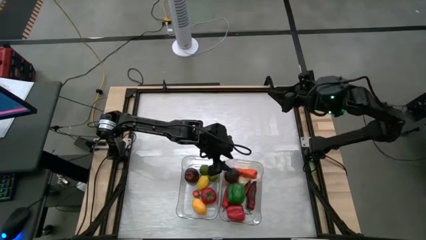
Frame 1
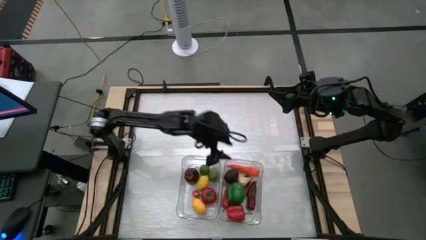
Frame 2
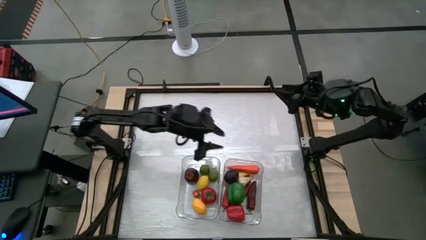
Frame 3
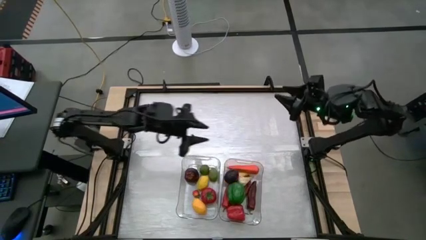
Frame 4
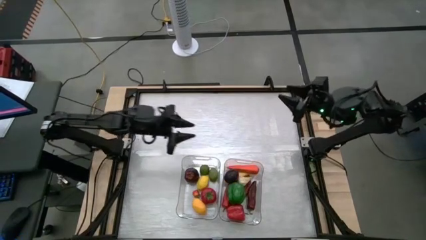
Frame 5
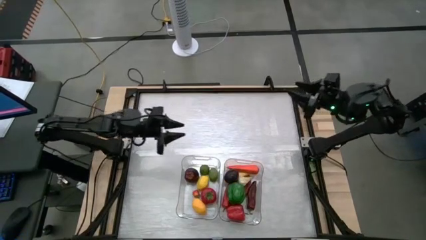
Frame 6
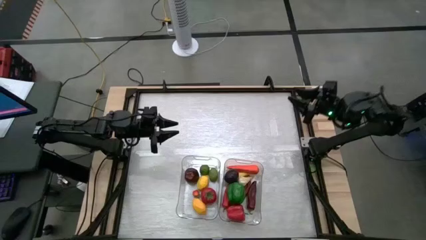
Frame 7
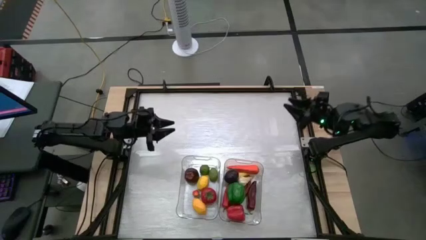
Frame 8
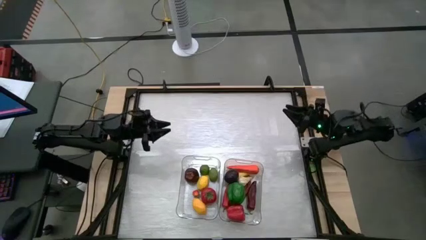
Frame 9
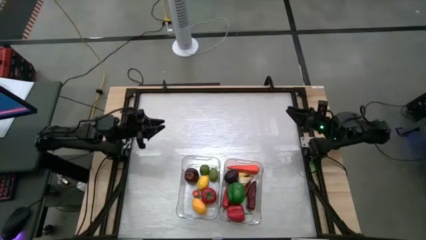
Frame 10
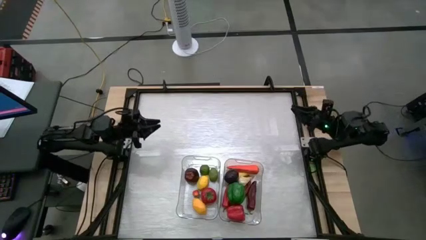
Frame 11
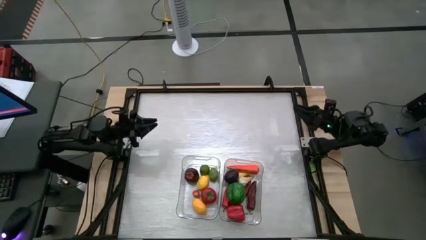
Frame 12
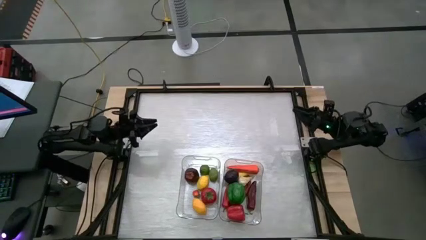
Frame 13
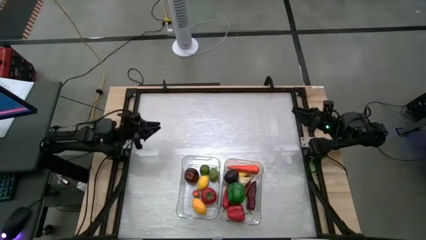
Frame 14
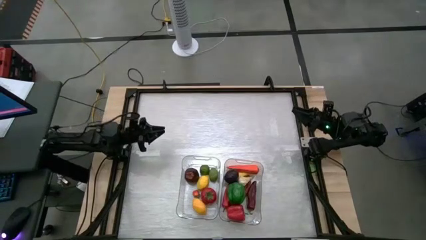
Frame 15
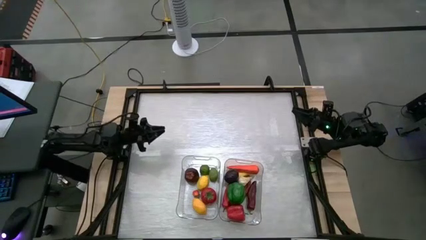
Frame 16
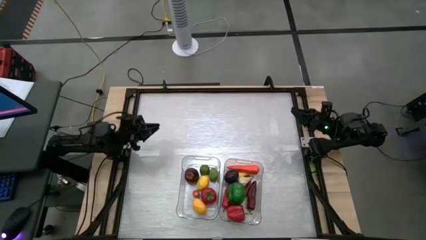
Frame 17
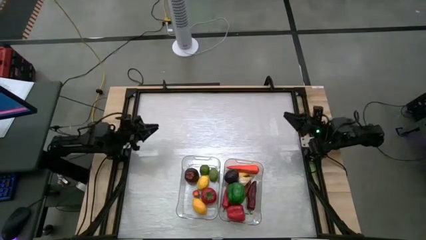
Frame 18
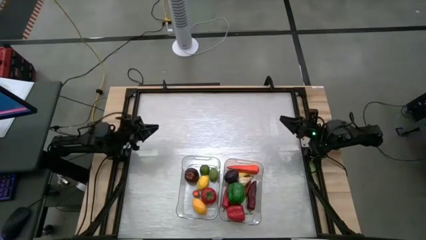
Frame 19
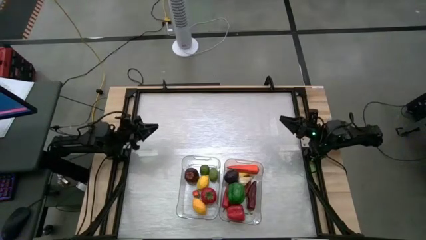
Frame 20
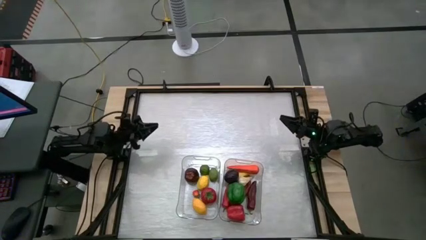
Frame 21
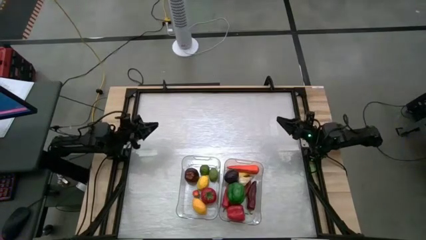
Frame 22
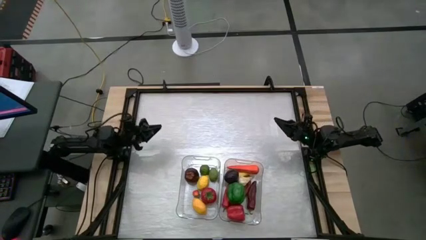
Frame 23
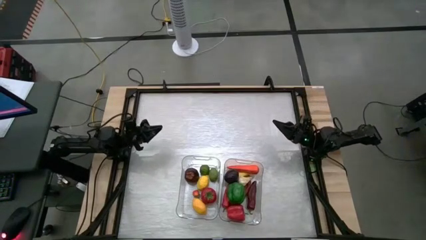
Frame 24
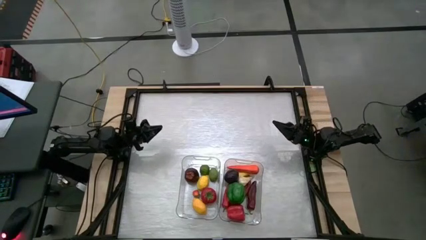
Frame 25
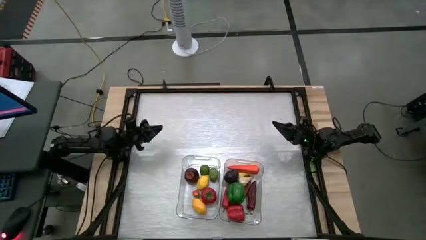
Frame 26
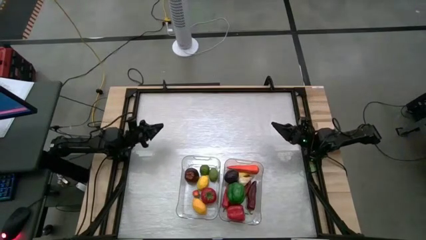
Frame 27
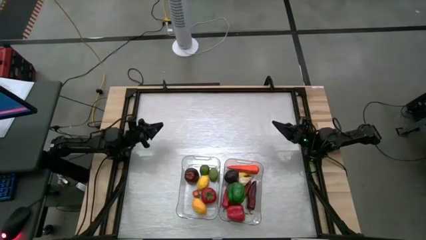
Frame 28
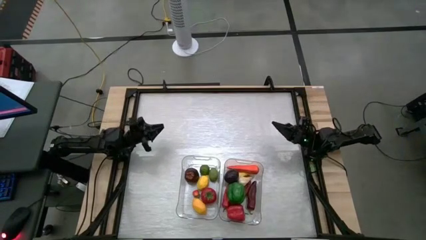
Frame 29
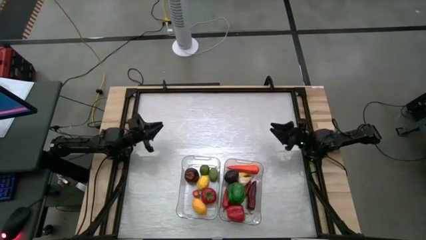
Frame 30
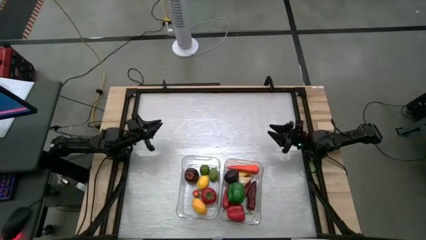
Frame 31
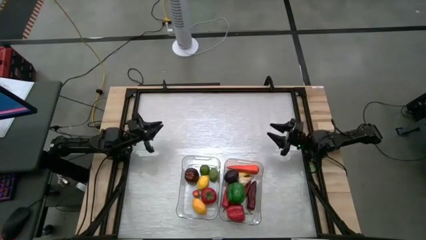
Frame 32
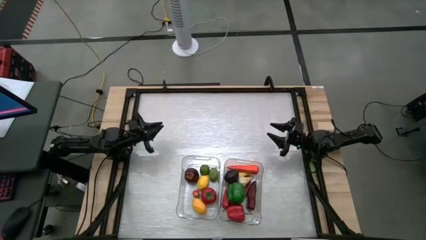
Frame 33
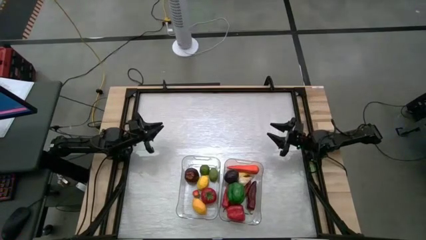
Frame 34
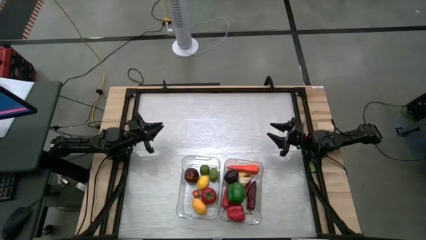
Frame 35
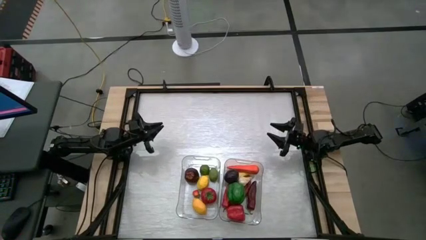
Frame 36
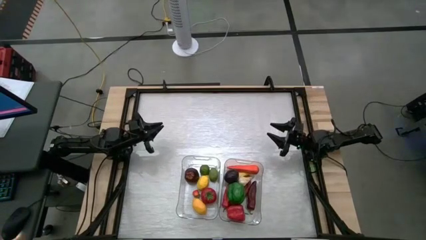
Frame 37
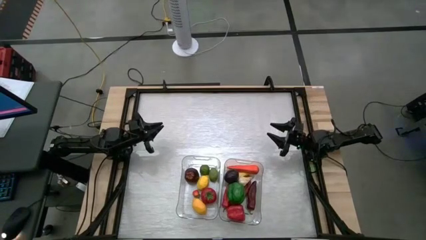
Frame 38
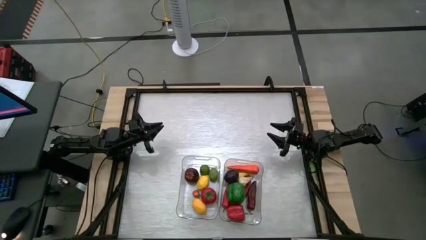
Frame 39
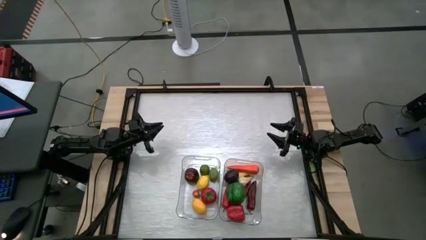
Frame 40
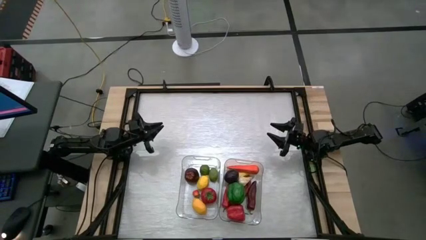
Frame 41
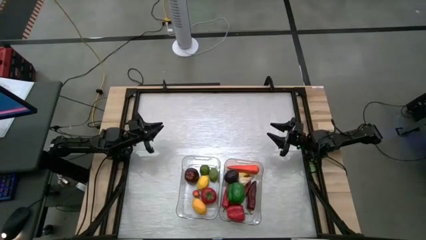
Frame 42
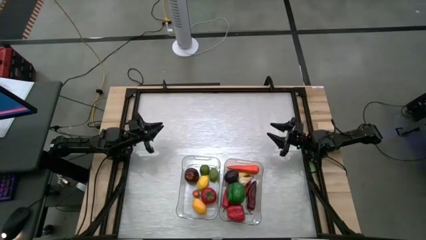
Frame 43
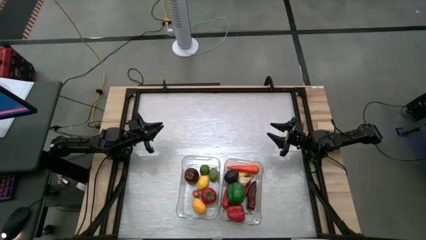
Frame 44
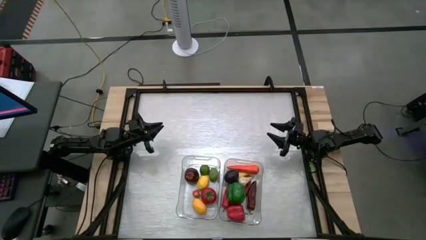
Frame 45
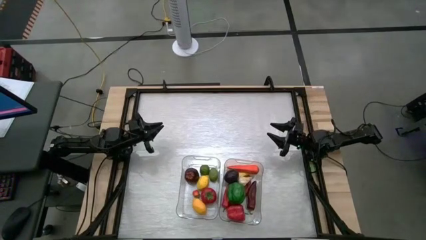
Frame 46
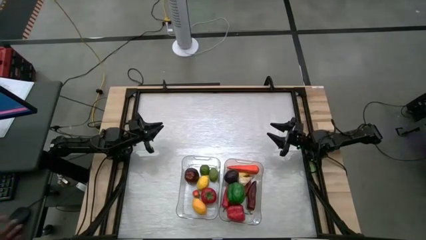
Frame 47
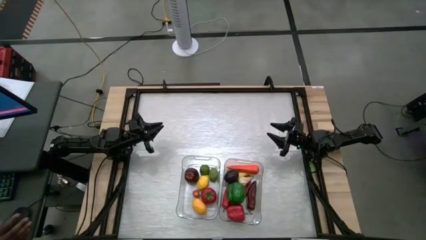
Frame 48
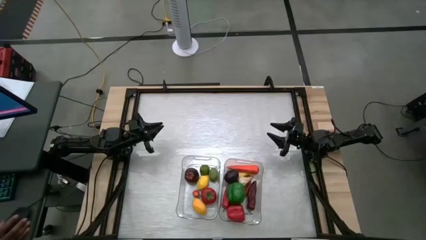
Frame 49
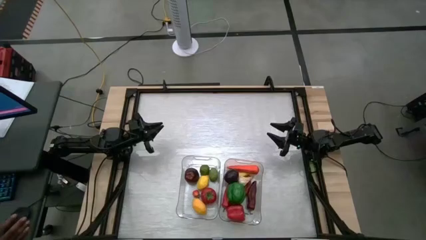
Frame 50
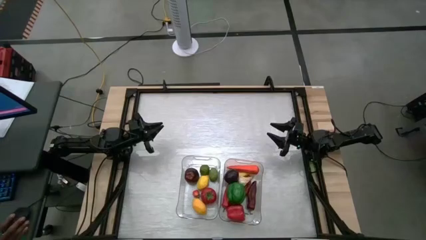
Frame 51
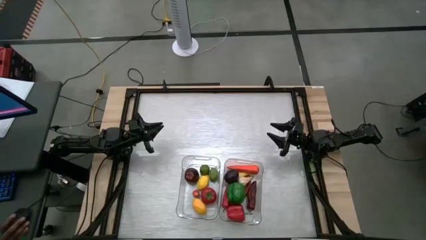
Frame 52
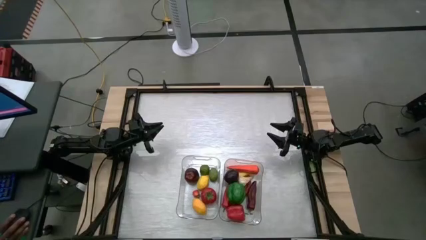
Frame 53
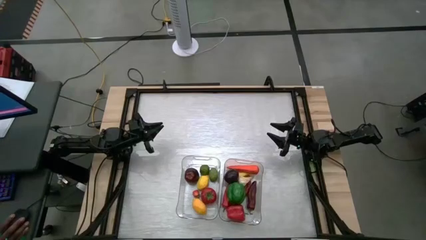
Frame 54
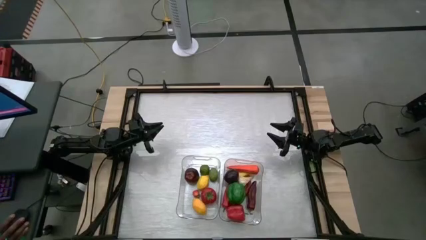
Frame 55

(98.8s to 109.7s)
Task: Sort produce into baskets
Return to Home Position

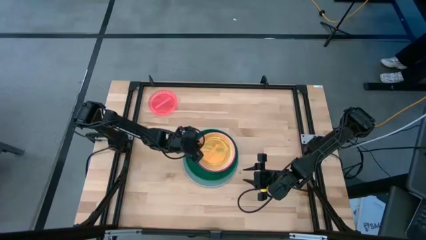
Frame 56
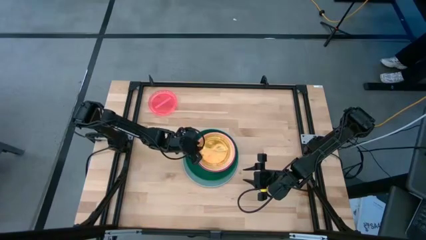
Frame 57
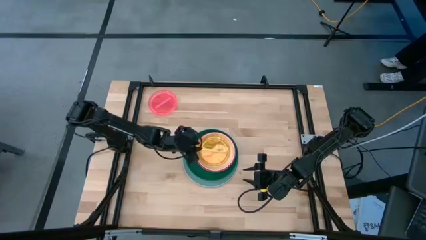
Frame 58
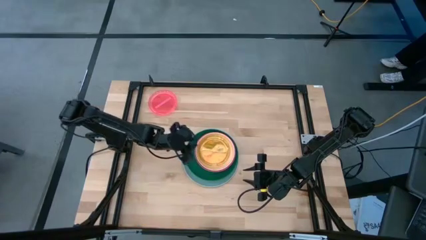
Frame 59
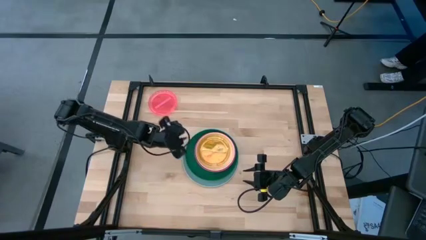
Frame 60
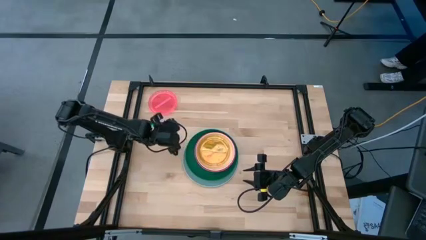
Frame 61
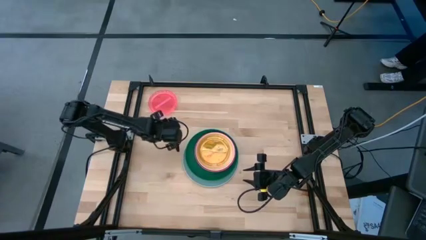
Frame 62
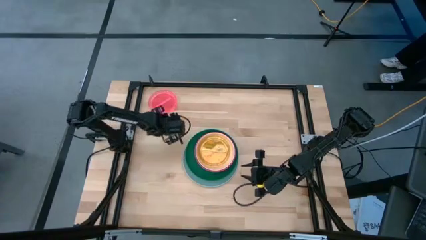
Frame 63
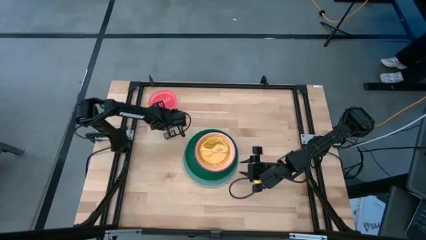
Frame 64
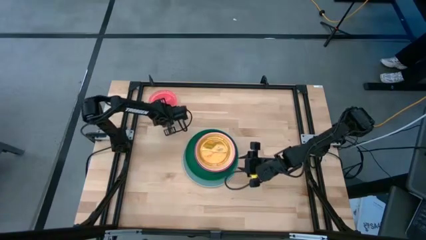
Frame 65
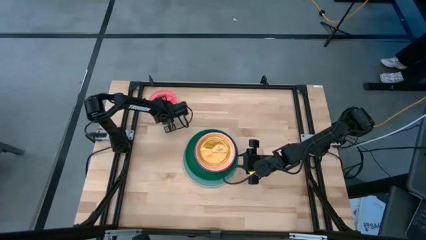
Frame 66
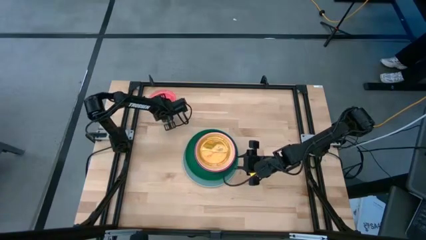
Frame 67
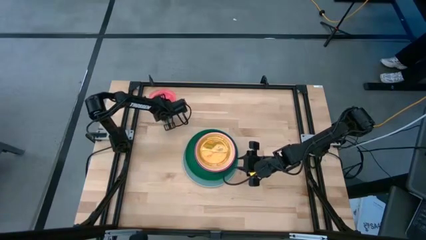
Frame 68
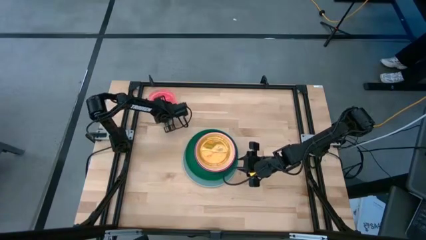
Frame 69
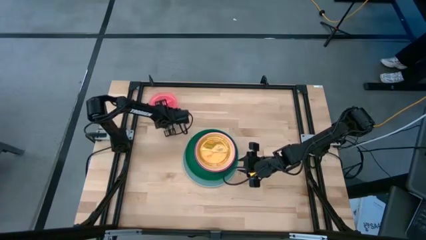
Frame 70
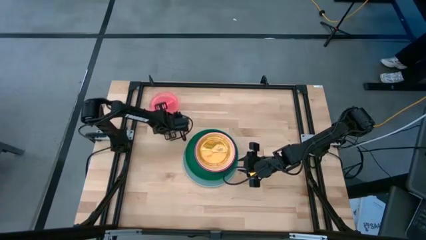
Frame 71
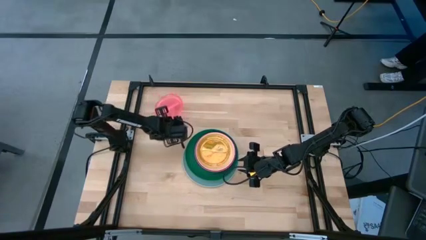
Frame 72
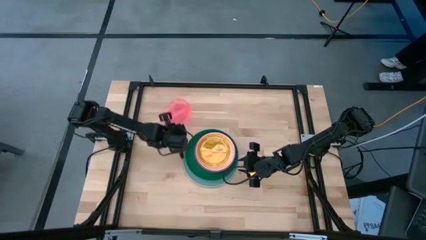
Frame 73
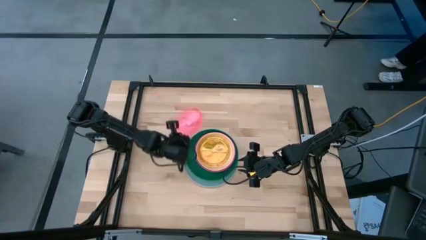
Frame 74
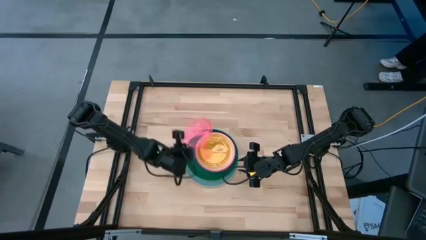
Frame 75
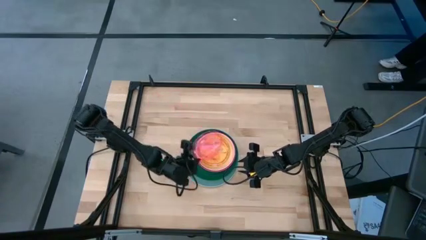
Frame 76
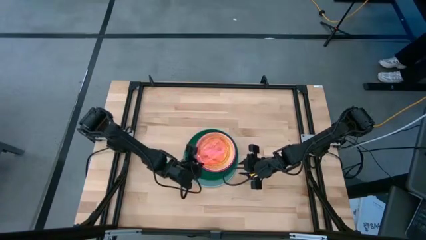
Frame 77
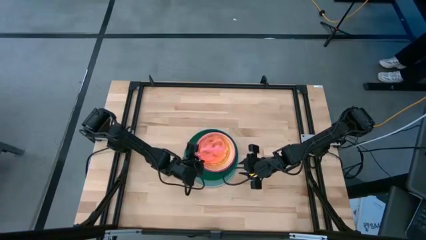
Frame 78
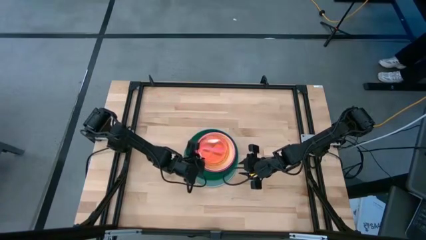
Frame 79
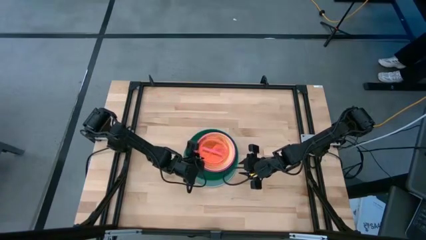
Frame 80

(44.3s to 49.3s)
Task: Stack plastic plates
Stack the transparent pink plate on top of the transparent orange plate
